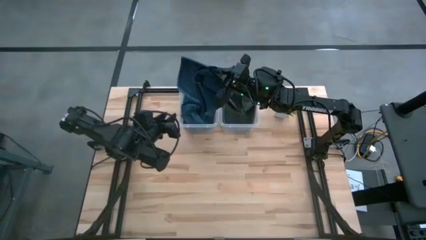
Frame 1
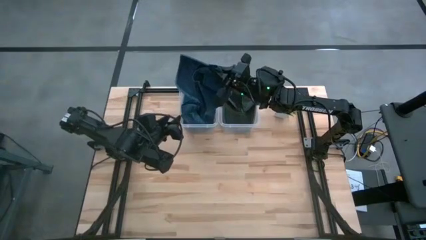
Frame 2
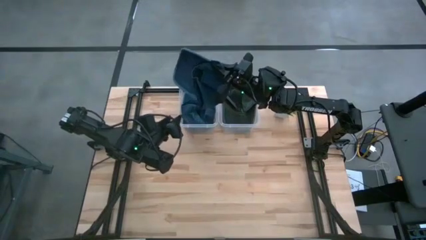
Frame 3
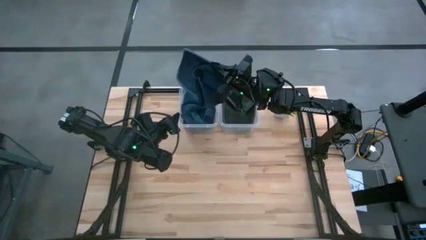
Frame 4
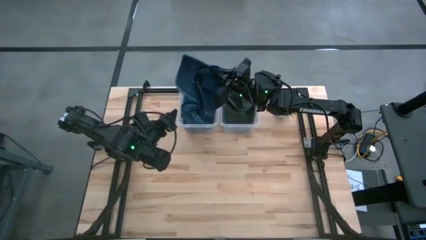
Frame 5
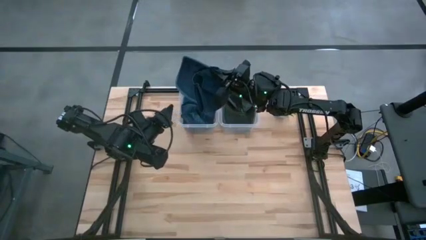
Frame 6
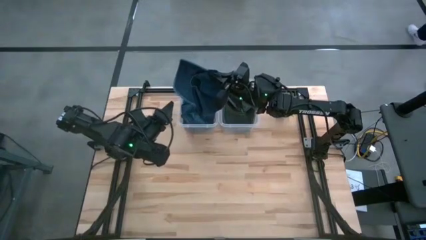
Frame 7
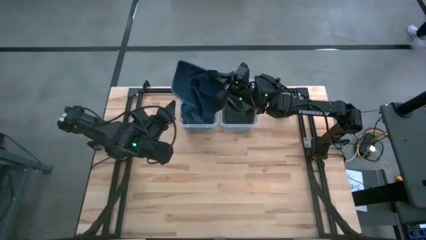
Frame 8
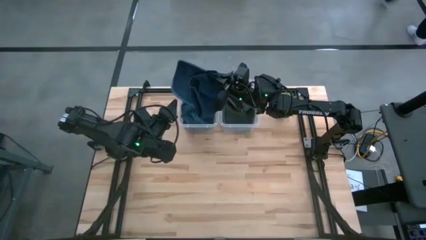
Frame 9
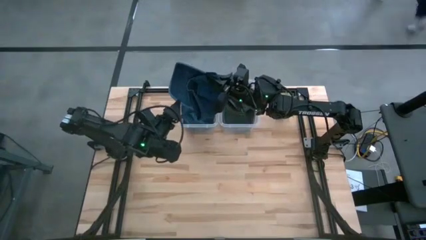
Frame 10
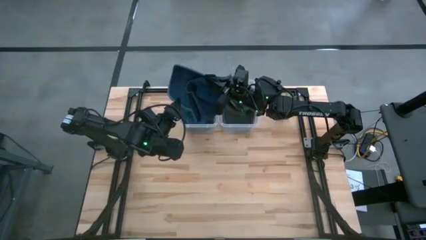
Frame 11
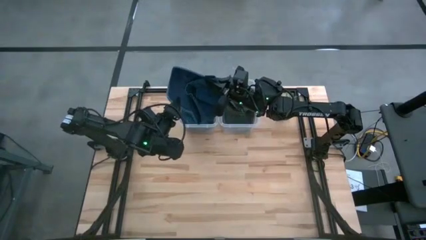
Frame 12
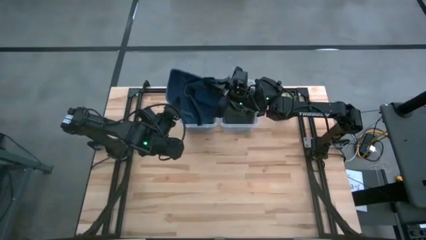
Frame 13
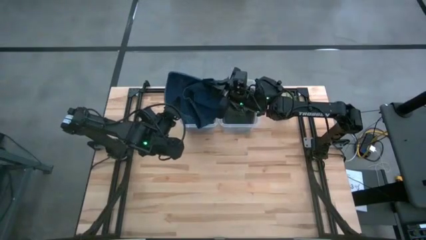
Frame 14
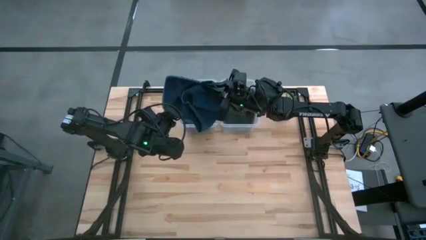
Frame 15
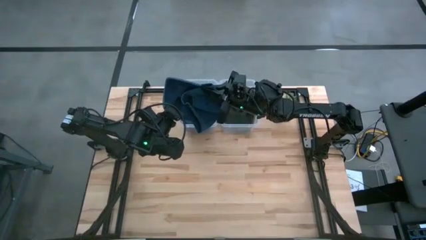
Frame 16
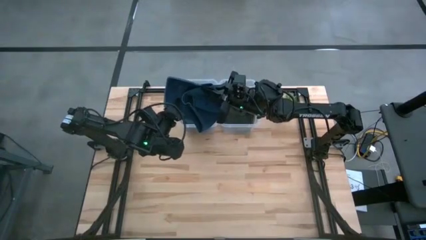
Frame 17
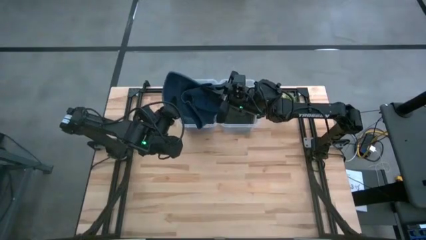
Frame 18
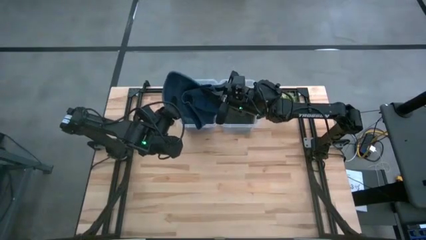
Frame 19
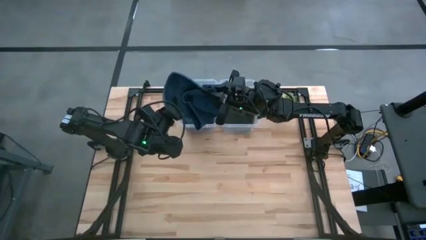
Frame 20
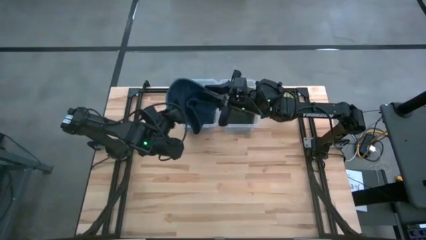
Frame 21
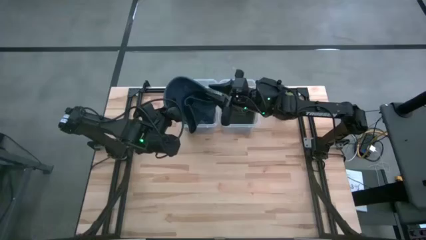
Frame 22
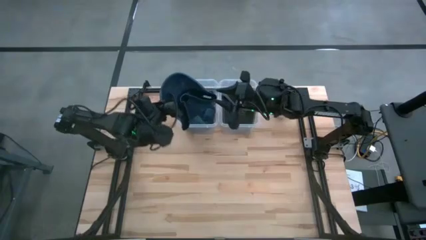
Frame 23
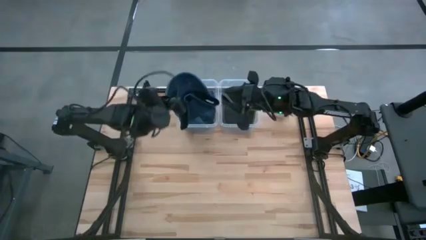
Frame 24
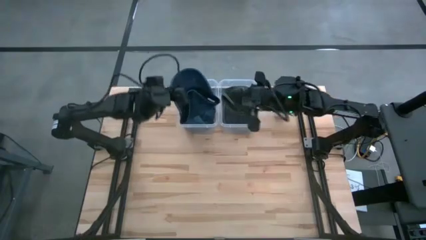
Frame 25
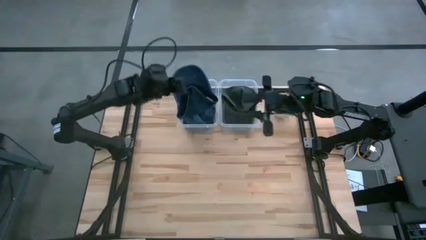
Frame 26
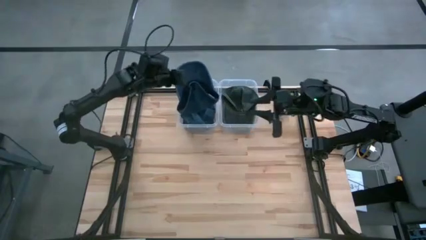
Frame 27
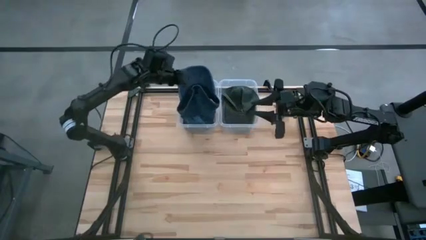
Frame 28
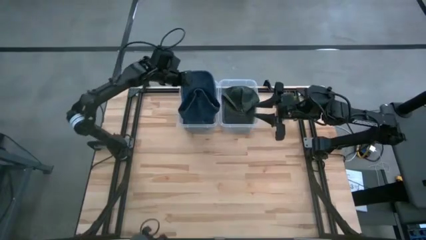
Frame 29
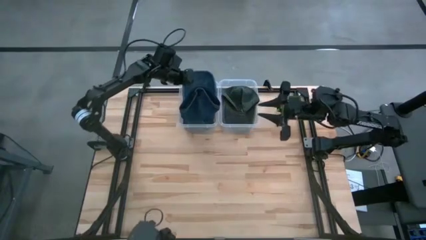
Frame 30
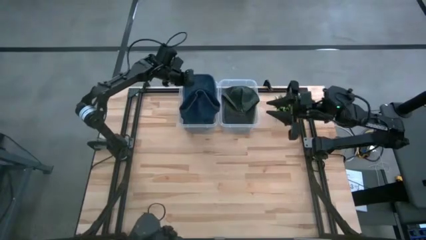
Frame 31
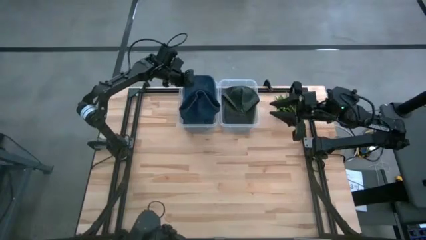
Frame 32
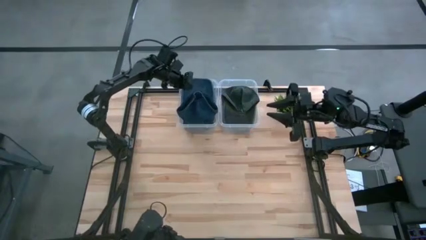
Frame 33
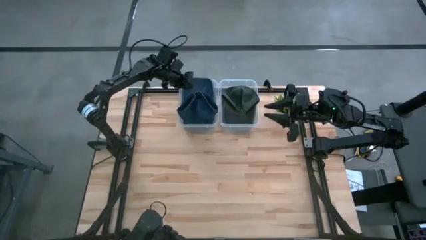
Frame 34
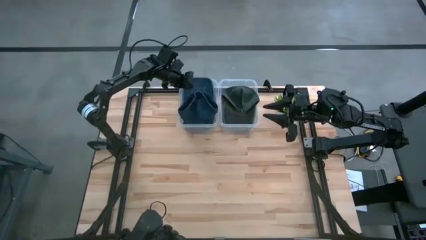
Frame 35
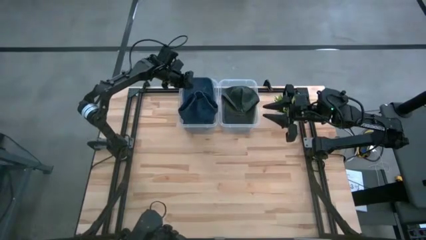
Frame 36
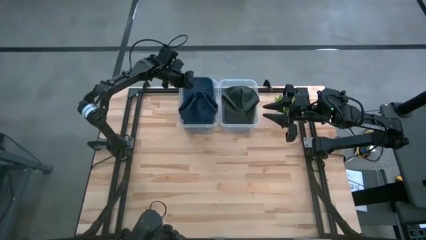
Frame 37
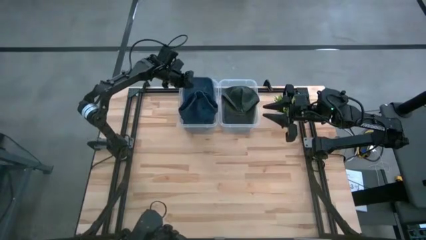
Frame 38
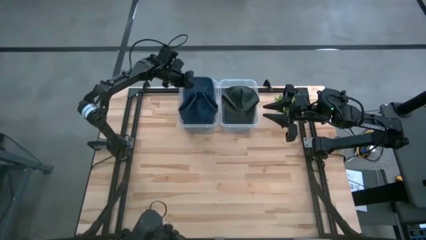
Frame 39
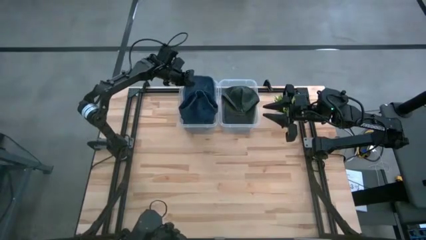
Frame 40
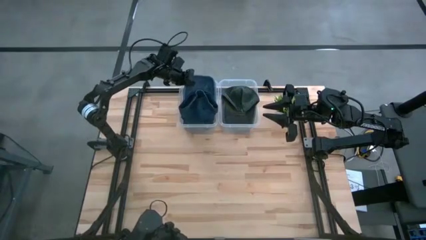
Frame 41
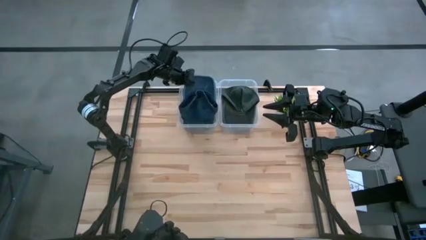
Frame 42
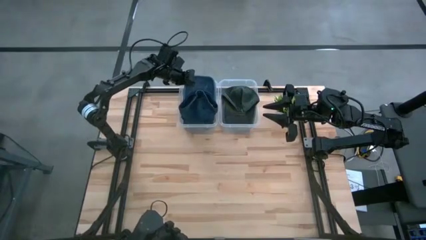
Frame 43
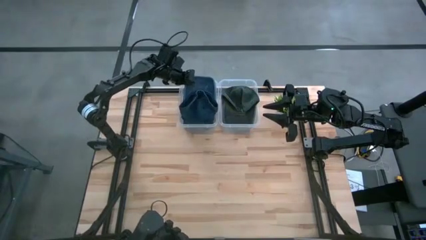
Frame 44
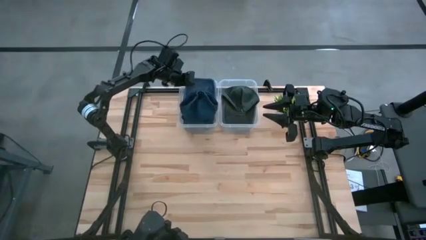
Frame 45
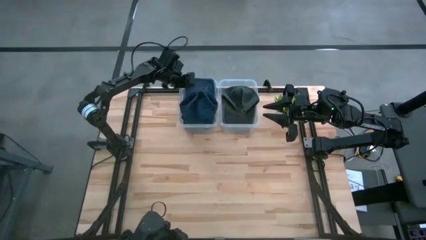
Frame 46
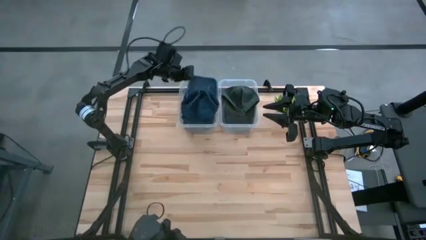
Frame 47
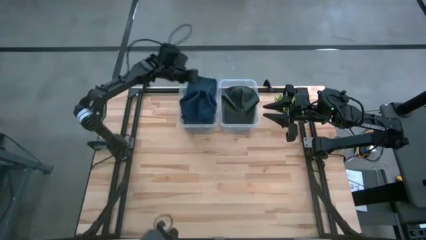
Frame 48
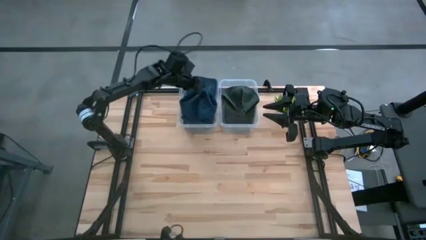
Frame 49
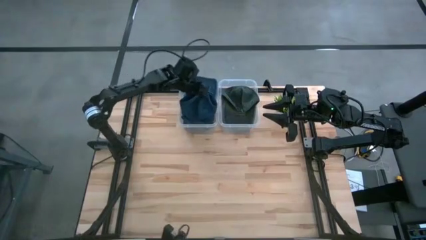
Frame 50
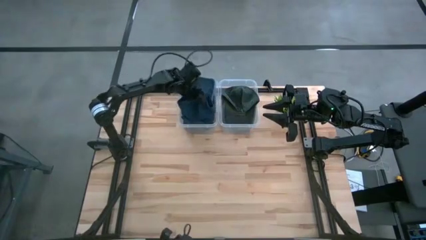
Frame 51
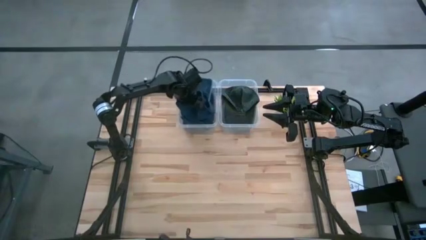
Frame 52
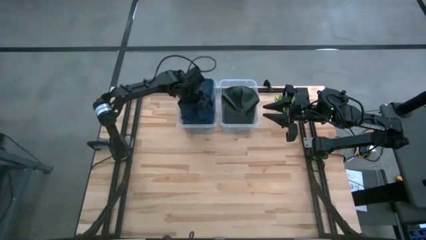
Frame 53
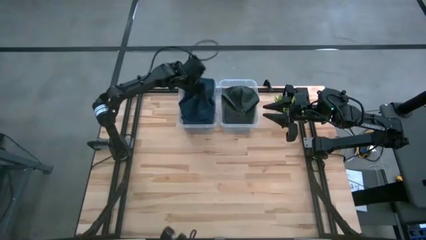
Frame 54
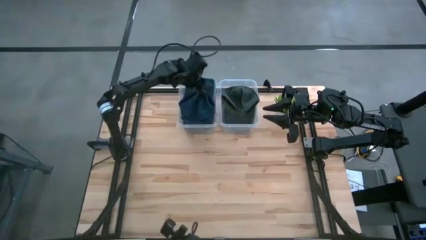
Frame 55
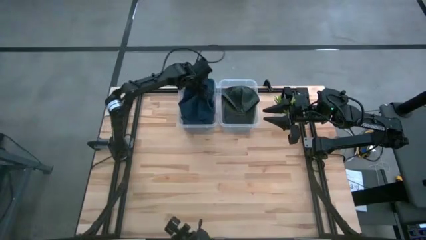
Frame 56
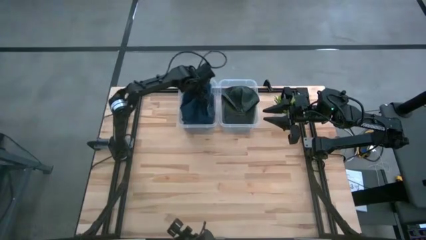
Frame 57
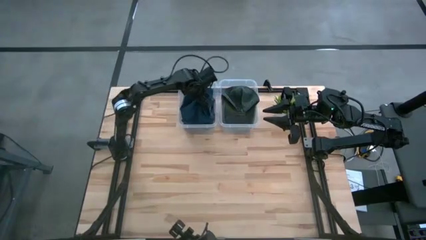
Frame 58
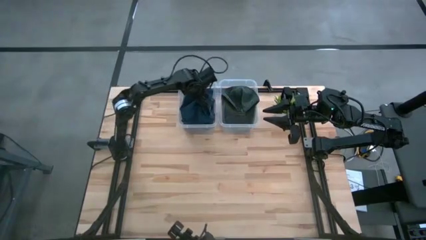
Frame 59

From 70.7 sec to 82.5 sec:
Task: Pick & Place hat
Put the blue cap into the left transparent bin

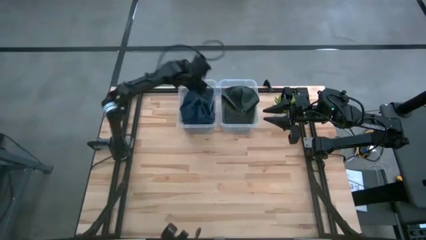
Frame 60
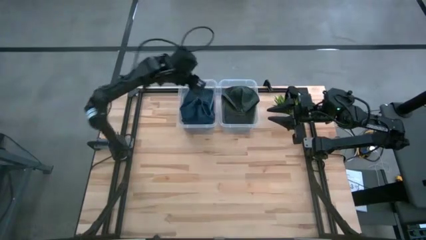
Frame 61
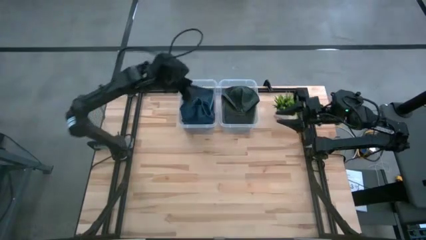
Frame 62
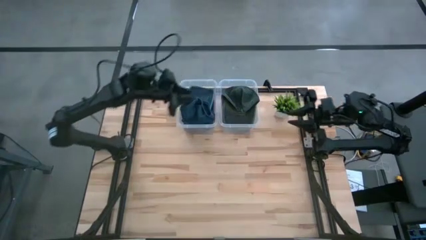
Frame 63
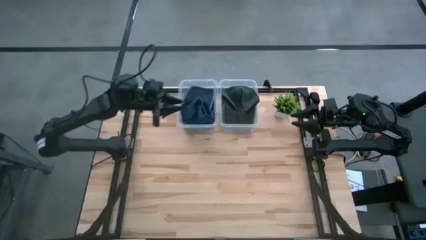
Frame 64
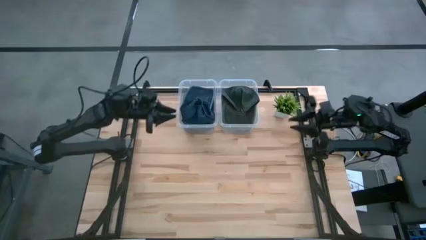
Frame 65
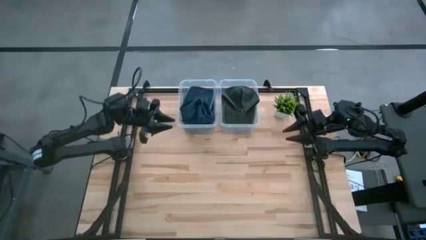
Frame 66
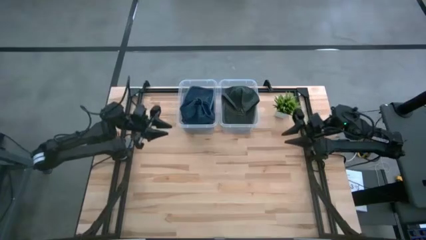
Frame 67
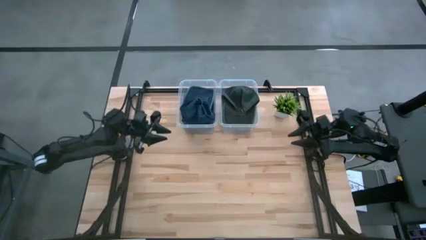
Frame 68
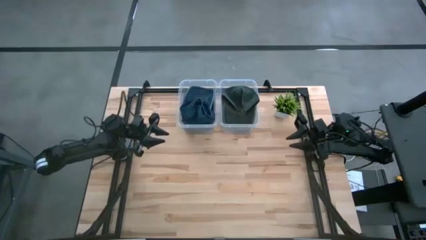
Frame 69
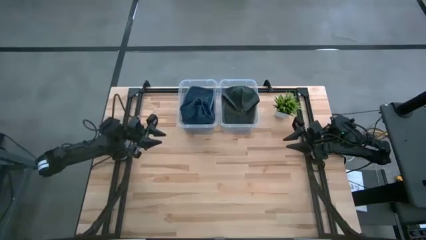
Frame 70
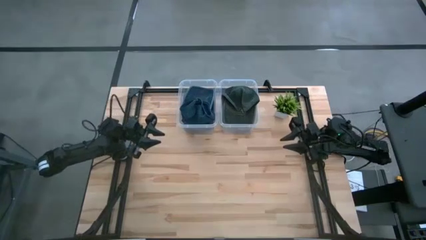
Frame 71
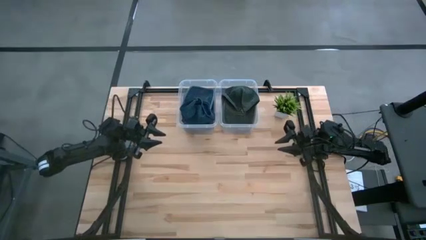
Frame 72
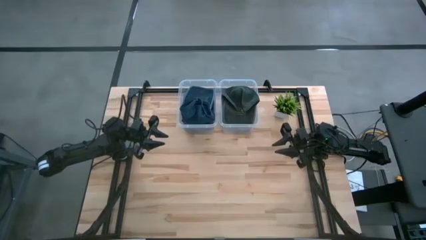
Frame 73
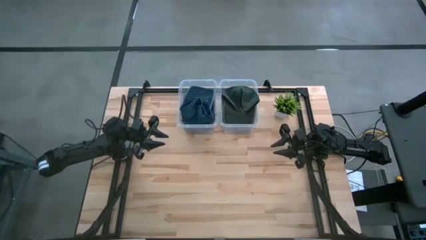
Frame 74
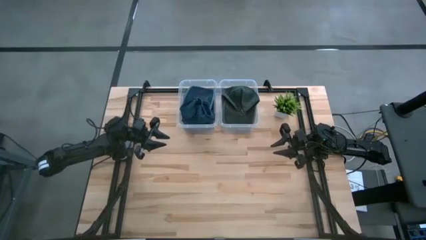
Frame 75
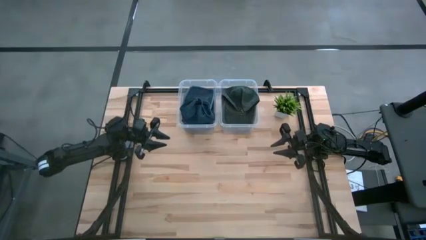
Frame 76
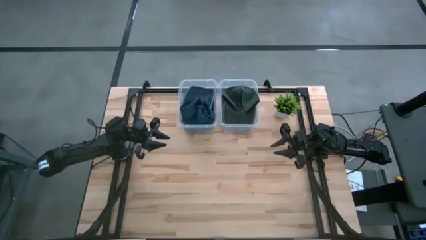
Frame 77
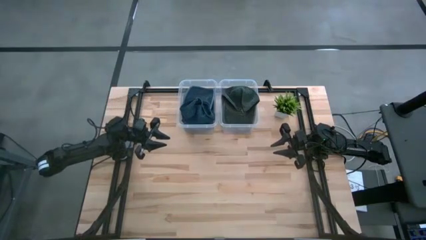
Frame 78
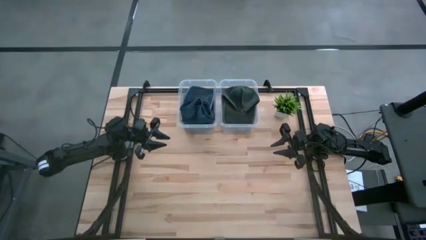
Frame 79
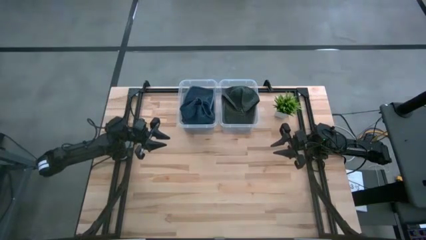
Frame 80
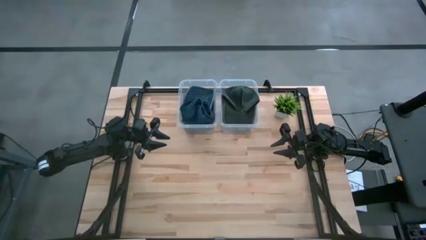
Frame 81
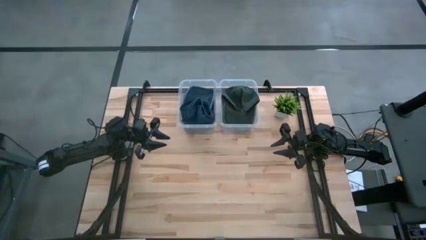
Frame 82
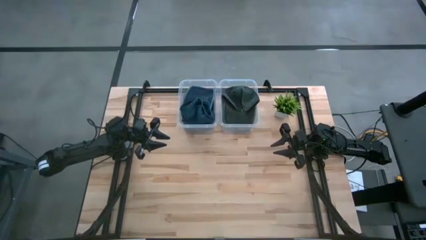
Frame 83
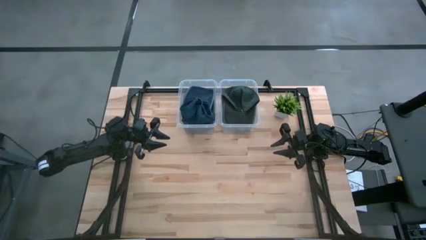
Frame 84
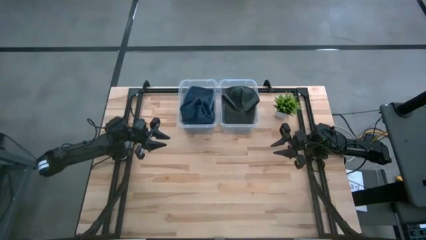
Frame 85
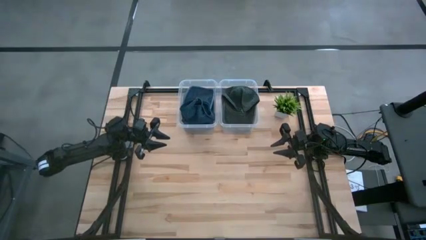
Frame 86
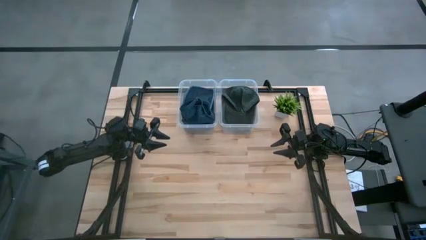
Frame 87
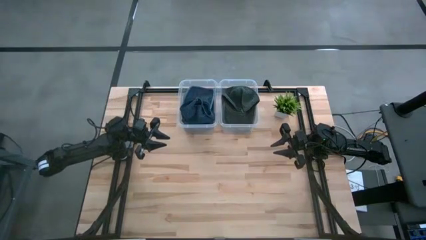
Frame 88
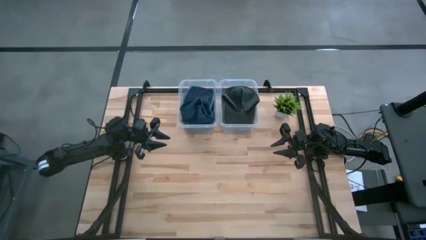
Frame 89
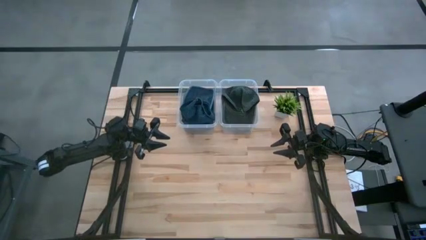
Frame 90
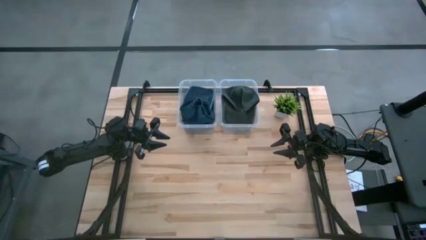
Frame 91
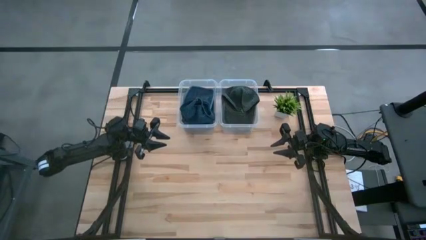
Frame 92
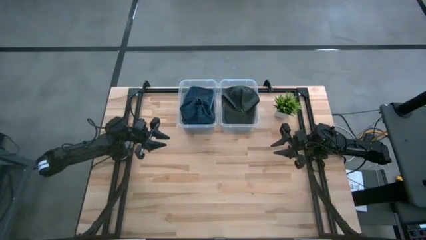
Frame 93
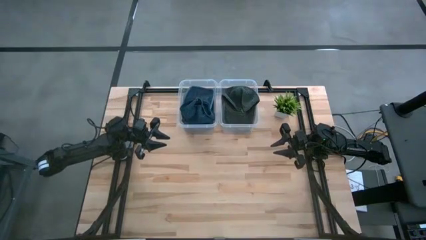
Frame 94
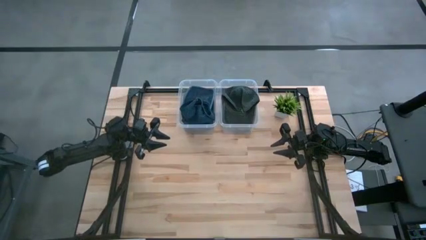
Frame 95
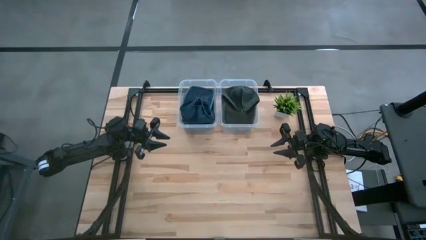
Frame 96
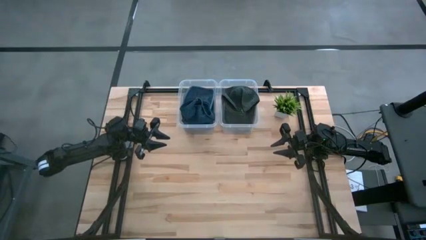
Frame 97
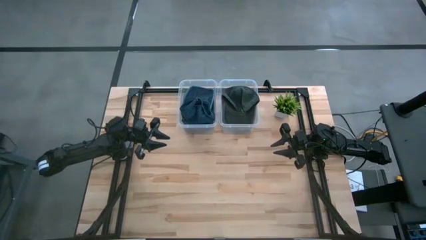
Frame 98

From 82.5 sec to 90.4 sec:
Return to Home Position
